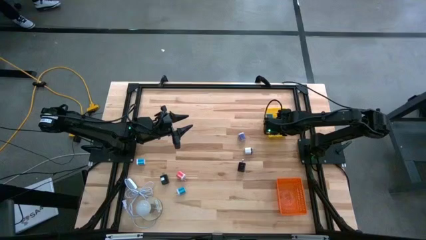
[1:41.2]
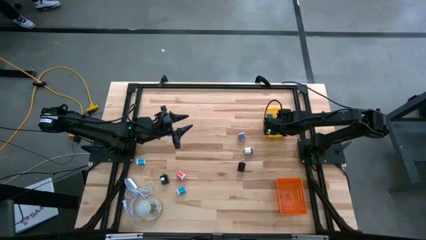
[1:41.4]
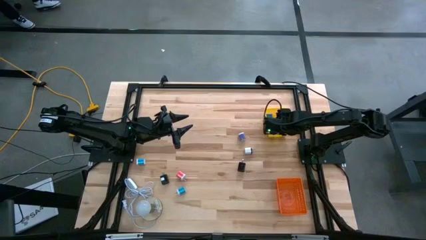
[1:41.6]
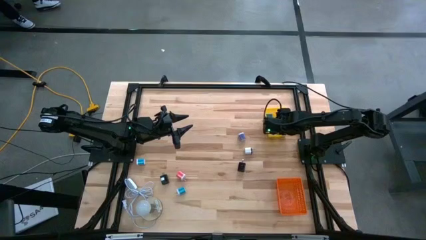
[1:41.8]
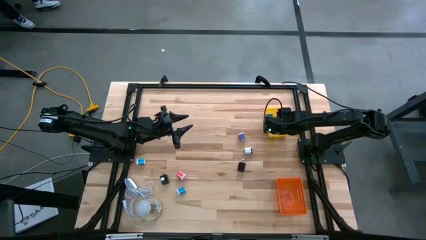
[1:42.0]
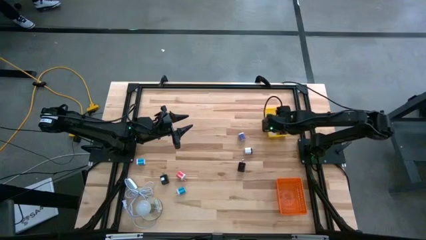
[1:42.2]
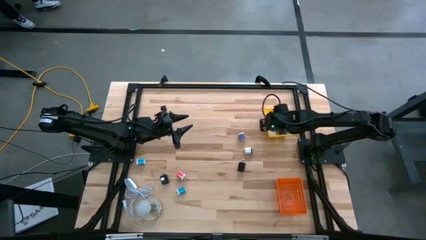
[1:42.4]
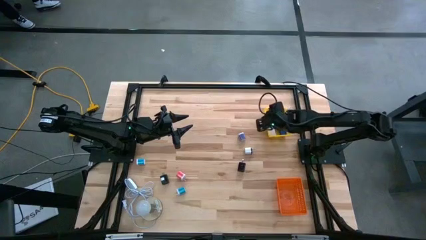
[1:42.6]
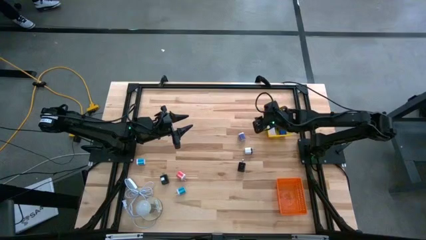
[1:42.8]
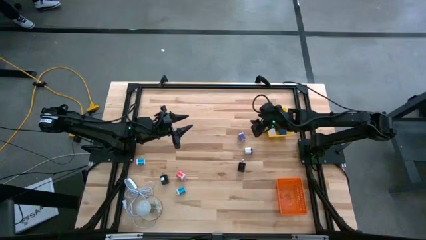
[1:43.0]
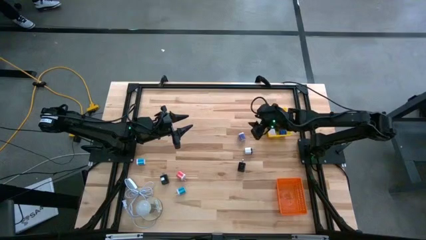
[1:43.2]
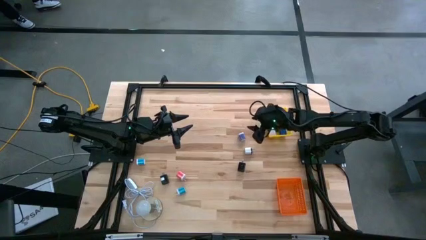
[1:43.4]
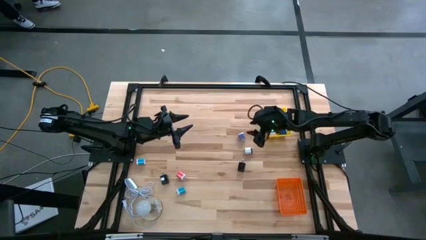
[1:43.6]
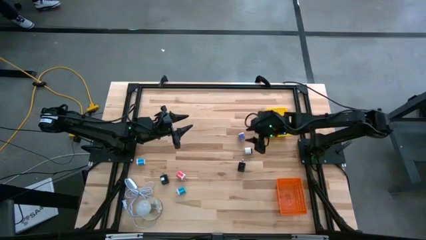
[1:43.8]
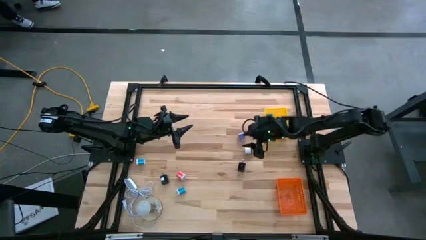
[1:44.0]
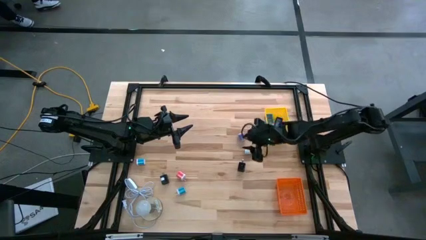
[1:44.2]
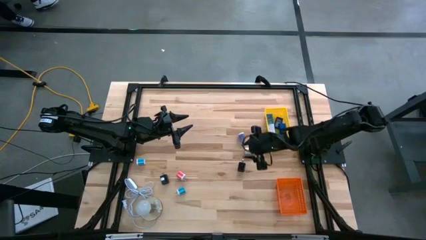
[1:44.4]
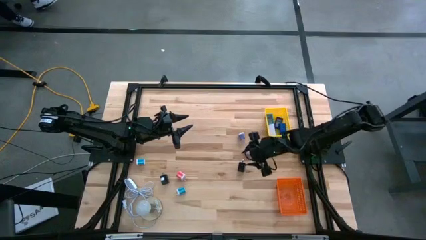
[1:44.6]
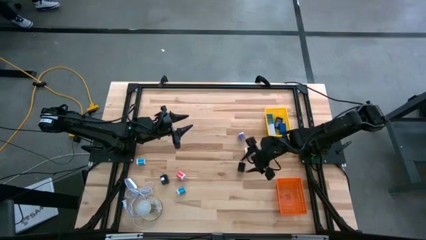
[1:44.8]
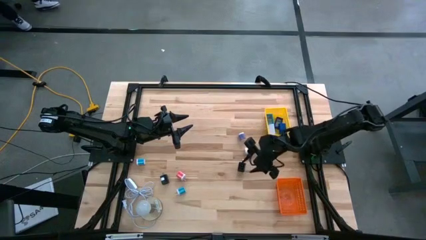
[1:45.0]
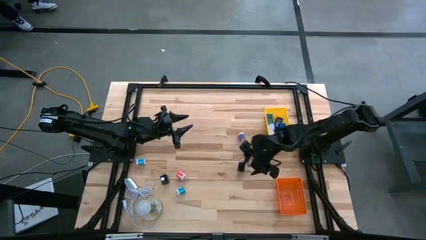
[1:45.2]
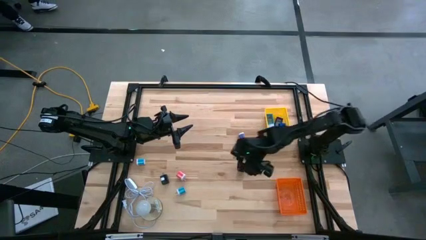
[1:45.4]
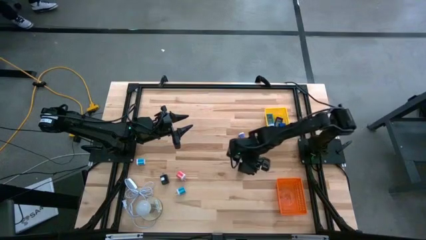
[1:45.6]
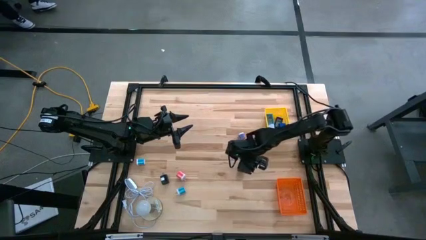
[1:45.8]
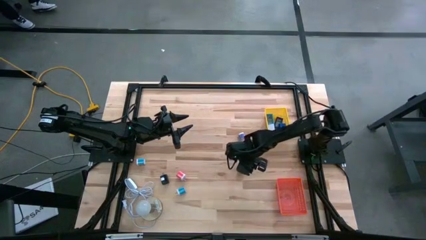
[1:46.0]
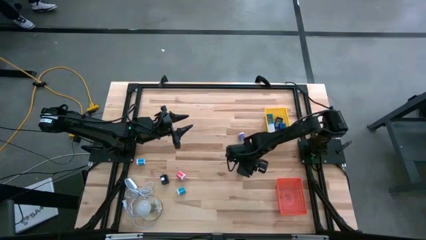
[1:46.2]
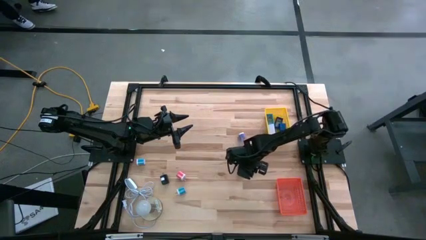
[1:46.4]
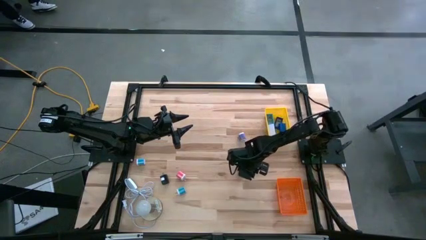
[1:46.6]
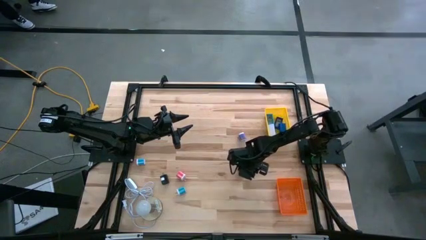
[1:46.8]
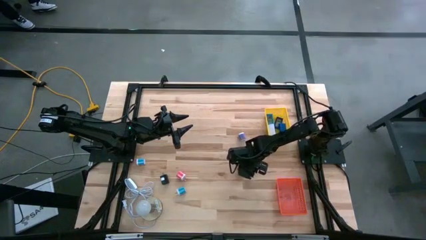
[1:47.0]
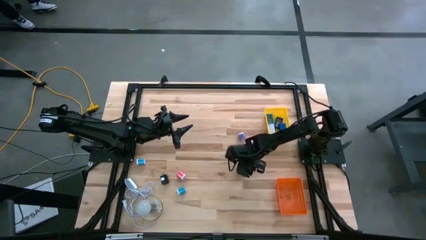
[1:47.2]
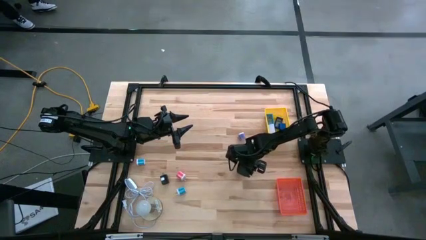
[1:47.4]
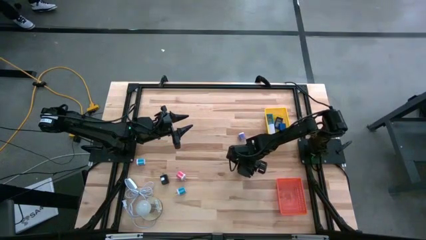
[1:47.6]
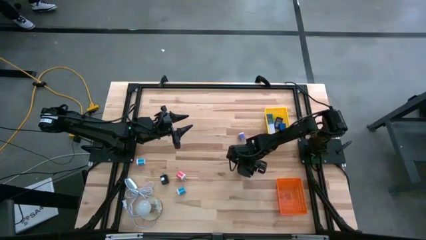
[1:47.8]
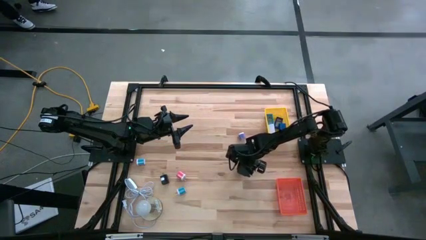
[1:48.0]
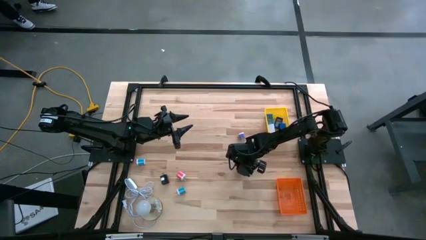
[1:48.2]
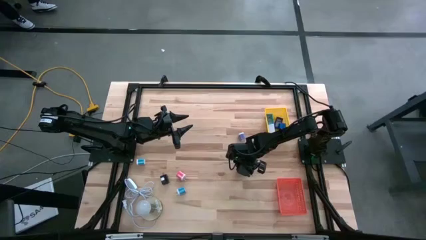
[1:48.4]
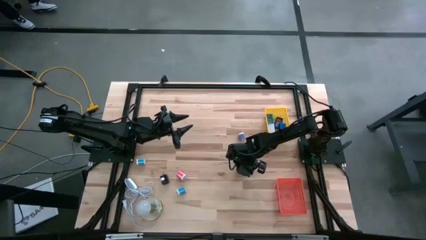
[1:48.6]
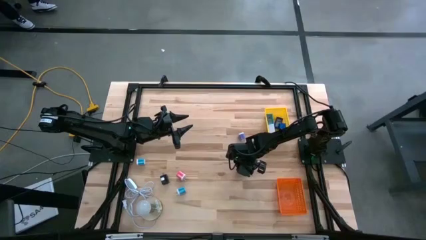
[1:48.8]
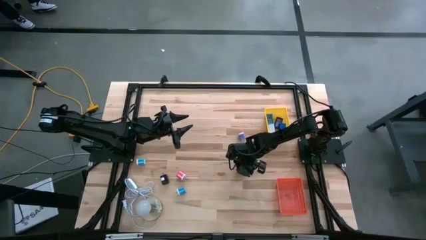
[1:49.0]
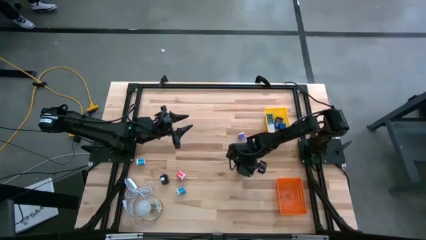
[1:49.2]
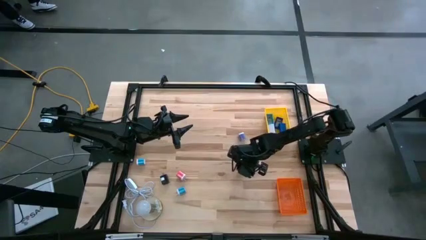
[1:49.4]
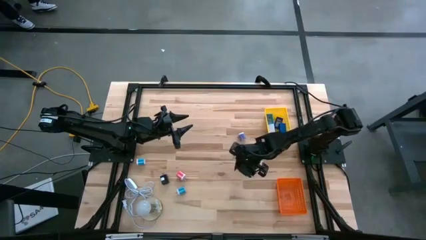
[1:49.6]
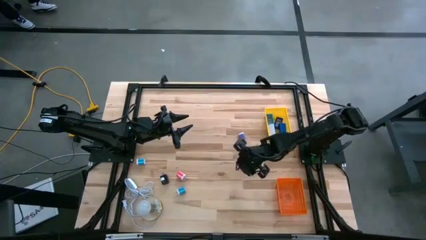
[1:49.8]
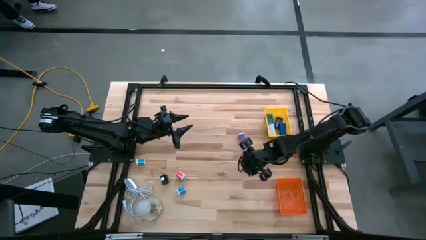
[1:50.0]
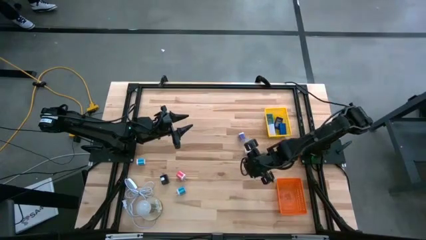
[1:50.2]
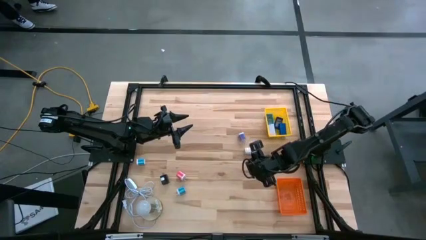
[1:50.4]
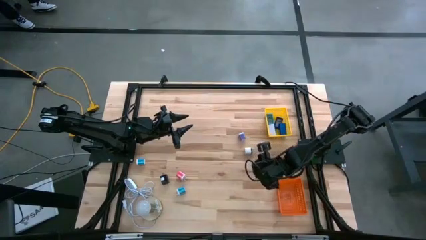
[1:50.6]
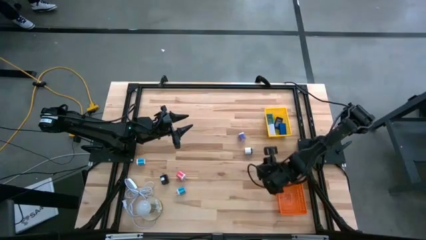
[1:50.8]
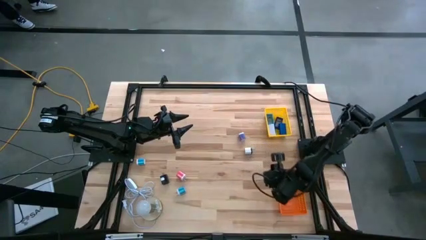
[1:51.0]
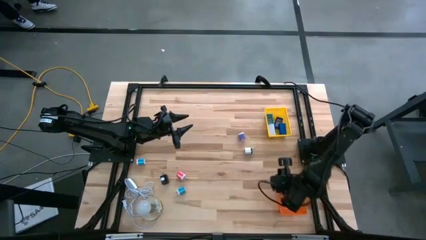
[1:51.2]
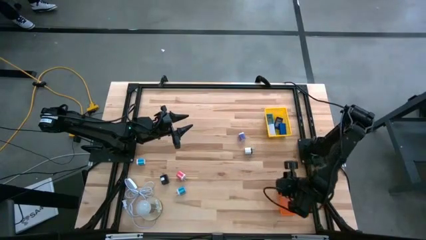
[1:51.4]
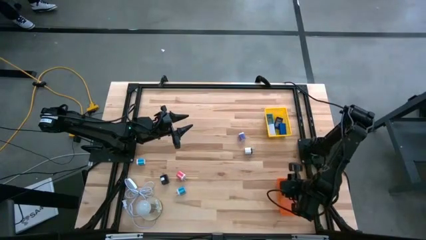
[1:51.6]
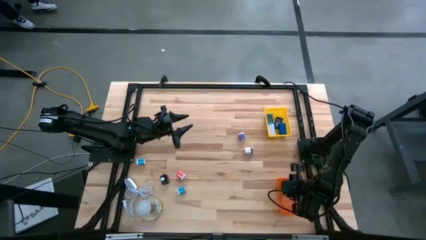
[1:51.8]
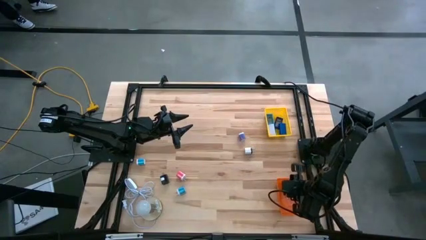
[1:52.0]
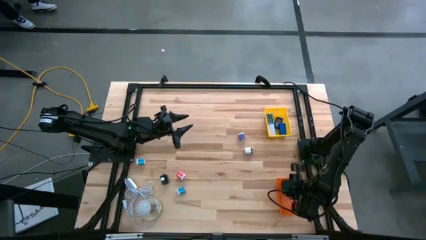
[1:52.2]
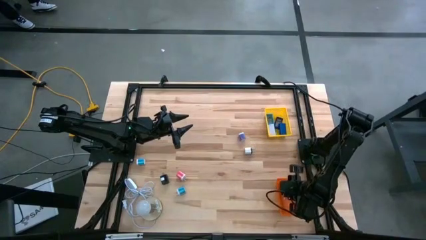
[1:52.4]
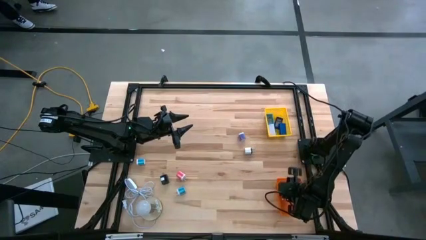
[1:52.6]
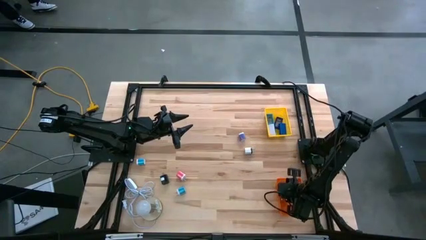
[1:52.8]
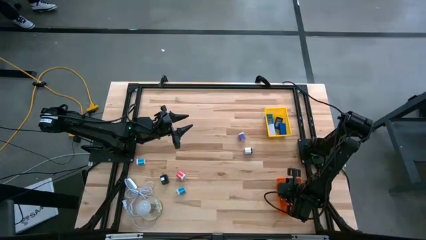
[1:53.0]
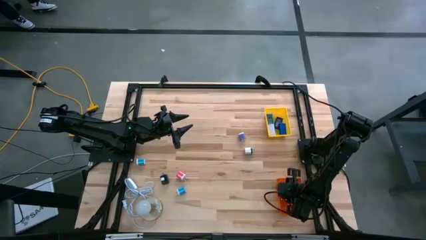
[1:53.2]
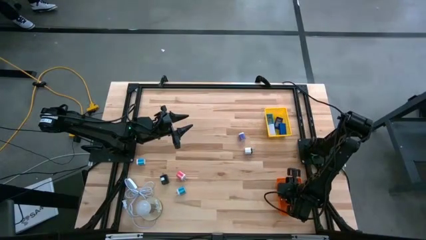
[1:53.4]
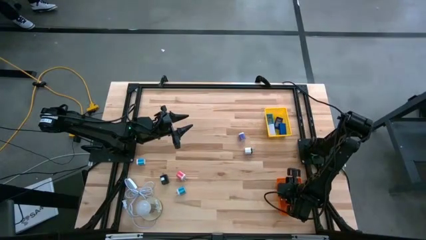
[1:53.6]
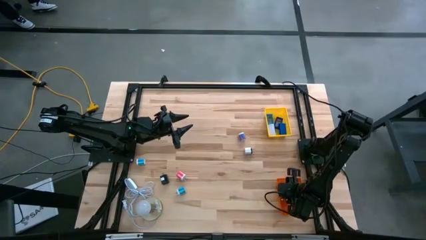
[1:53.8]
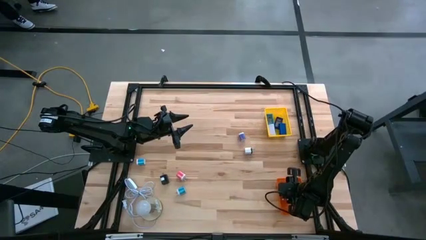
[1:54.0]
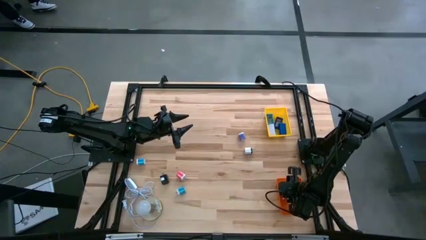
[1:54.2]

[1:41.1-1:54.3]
Task: Pick & Place Office items
Put the right black charger adapter into the orange bin

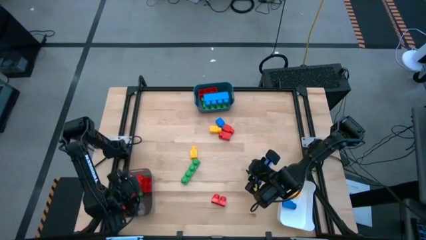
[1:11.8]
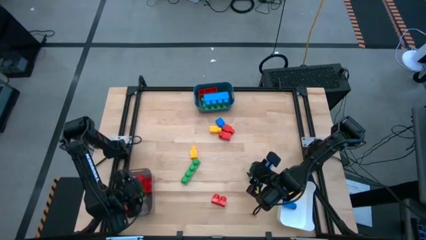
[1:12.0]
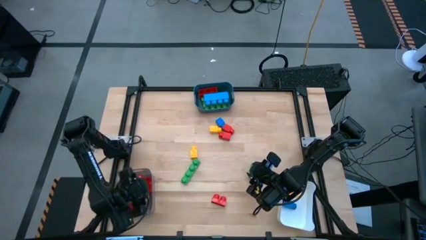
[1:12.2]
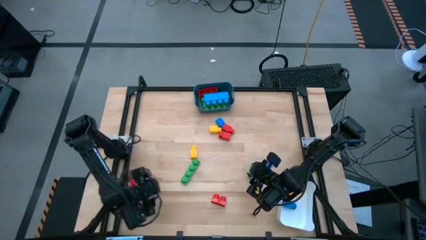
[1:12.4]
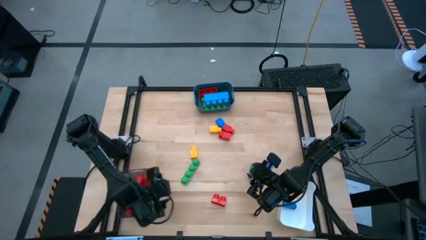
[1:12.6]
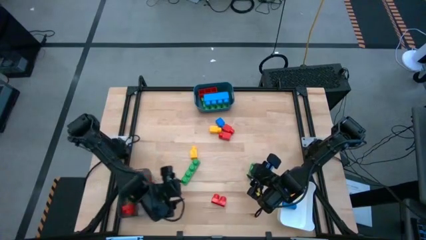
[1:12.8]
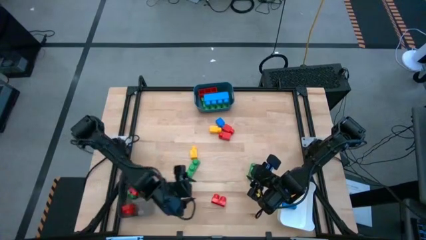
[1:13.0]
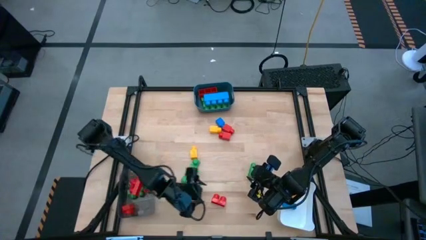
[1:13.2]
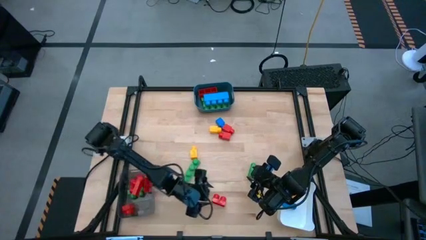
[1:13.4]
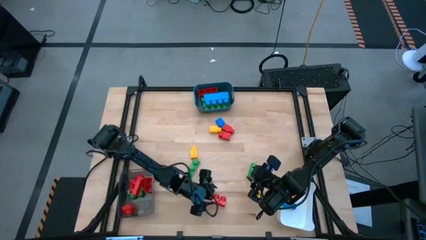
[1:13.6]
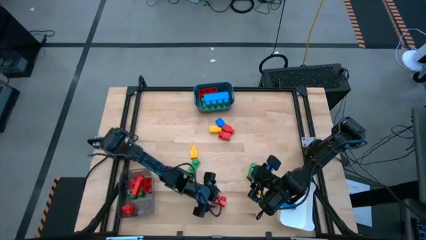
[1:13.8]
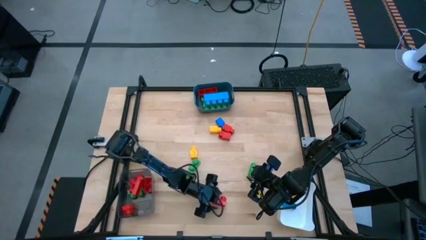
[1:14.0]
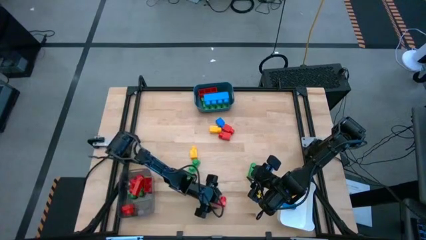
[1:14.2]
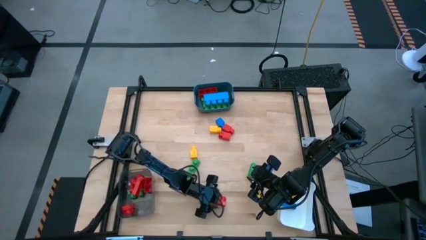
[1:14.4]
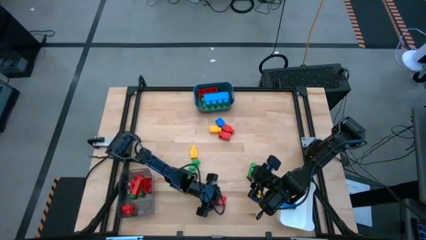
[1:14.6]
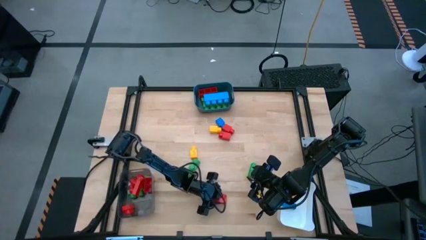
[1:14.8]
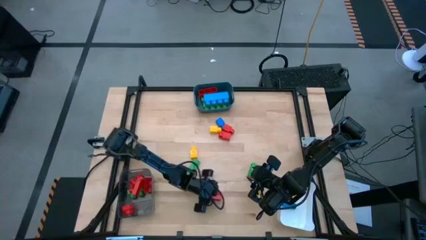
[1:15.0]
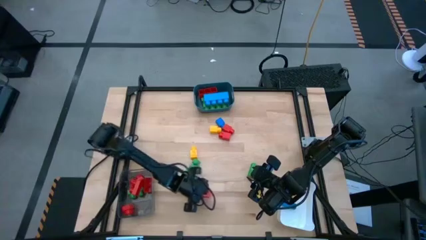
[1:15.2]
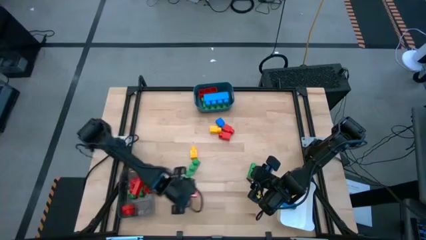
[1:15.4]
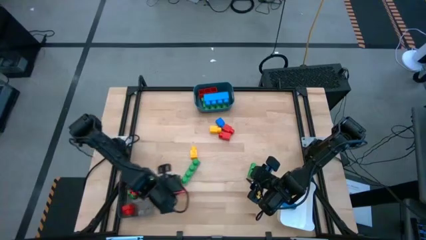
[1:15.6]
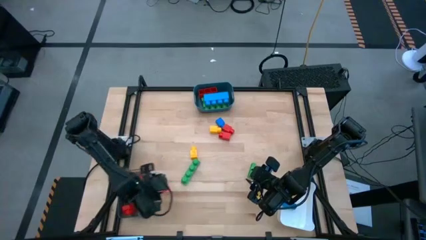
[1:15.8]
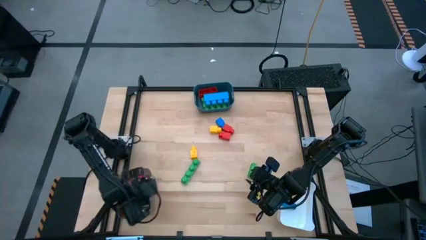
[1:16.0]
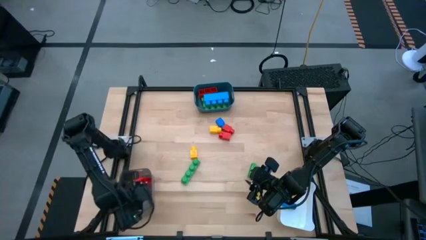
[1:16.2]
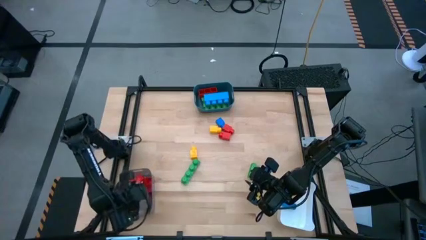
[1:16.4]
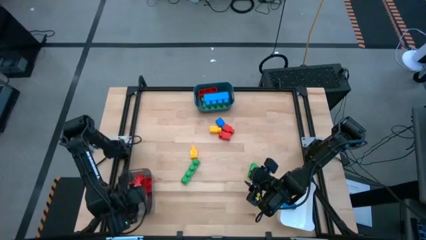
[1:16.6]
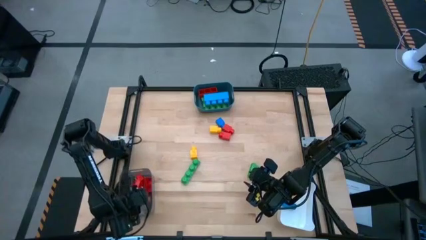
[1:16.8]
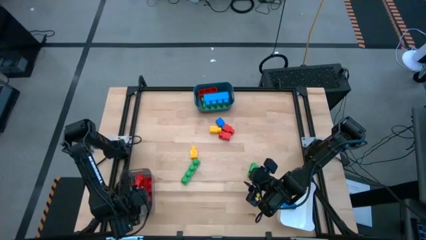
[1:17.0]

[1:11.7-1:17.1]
Task: Sort blocks by size
Put the red game piece into the grey container
